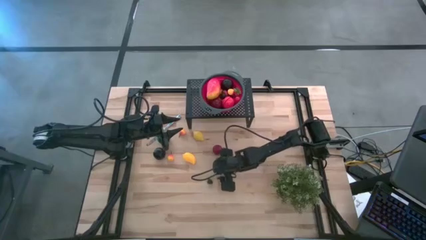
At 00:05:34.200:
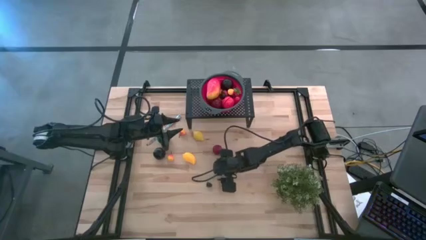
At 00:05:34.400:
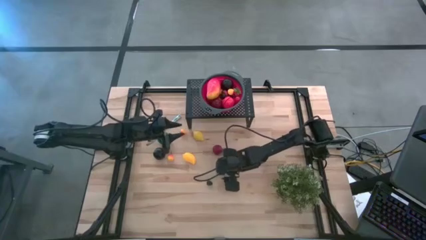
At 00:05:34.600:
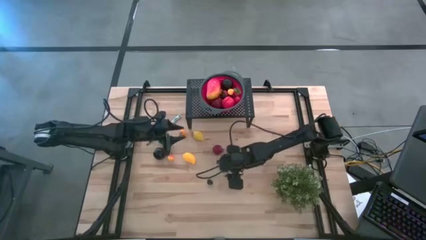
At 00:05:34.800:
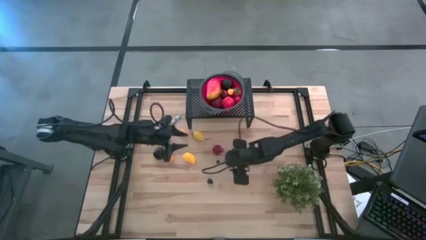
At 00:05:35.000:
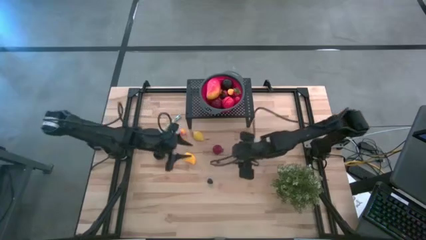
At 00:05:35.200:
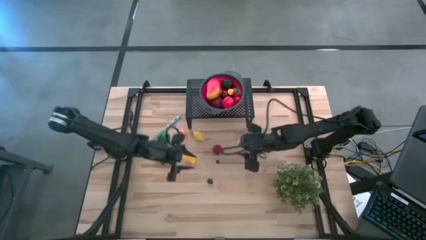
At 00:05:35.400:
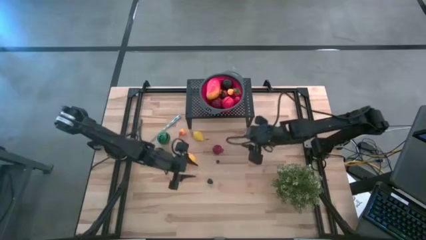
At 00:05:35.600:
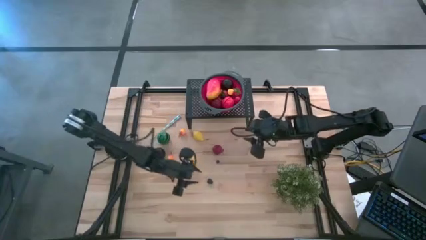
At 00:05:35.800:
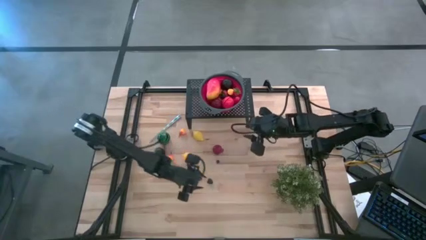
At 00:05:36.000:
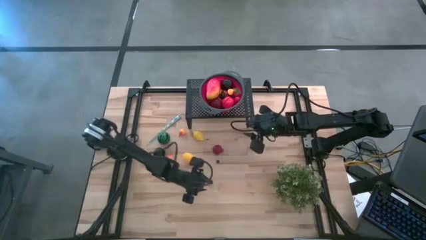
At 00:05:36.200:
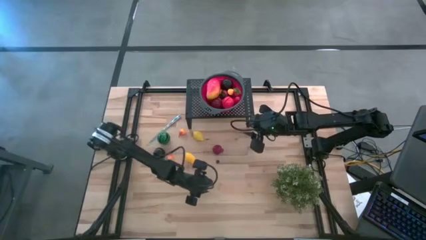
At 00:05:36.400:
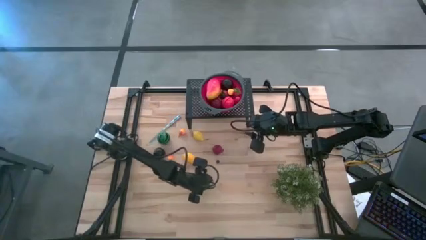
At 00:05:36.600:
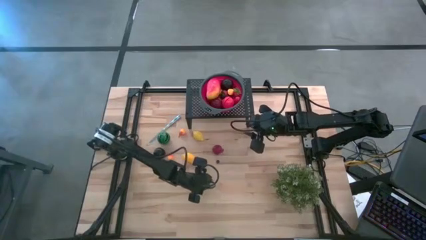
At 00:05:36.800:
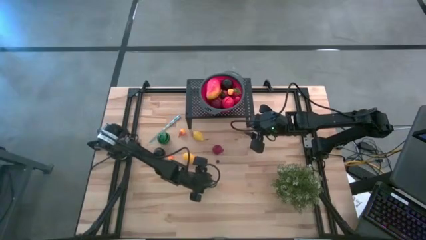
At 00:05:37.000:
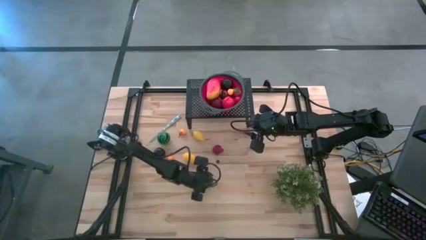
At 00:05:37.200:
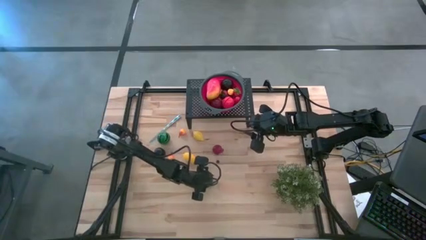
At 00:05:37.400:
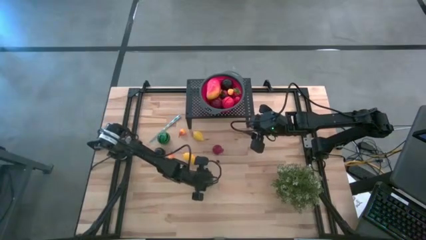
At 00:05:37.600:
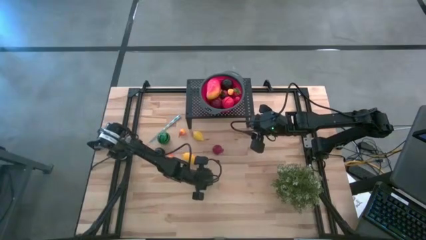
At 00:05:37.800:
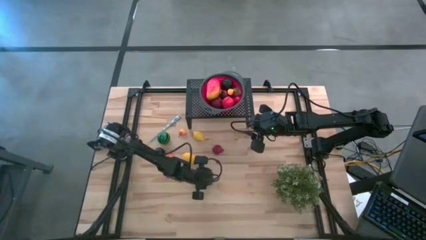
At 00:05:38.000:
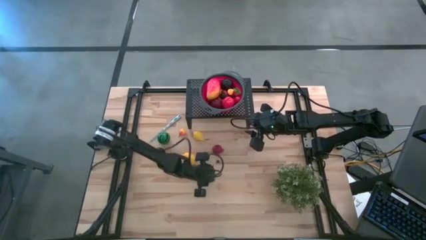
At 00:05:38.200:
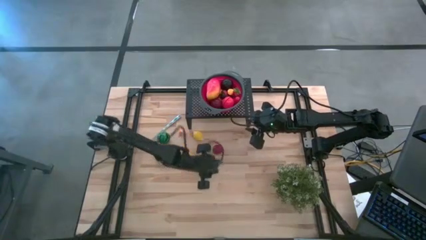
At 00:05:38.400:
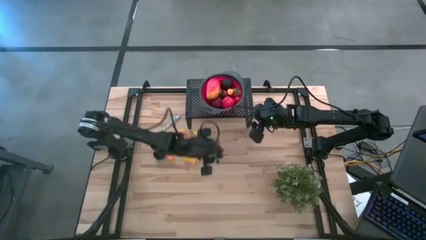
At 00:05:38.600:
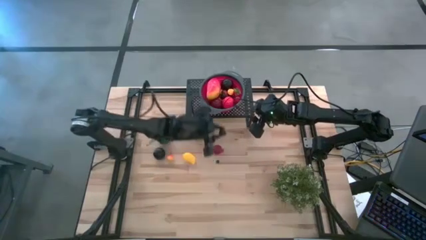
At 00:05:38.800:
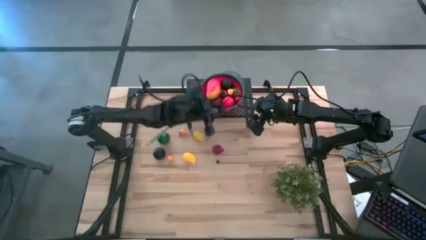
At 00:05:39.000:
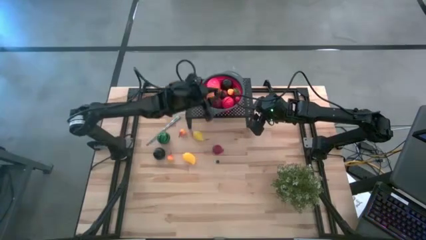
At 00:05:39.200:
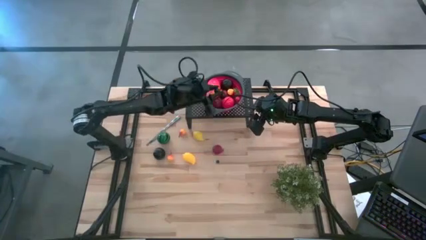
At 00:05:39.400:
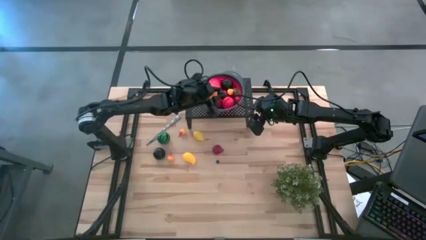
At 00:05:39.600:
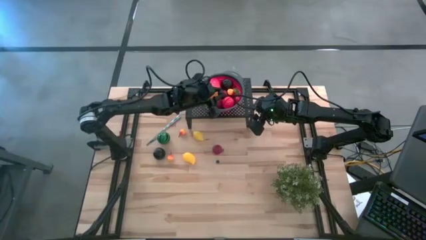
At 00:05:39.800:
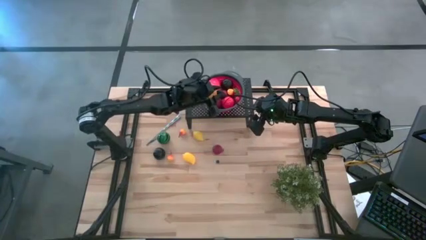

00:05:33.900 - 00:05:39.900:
Task: Pick & Place Fruit
Put the blackberry in the red colander on the shelf

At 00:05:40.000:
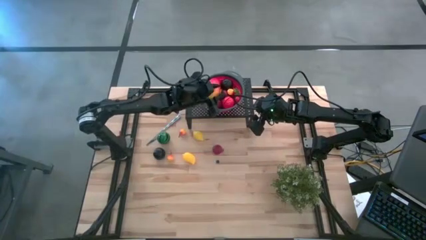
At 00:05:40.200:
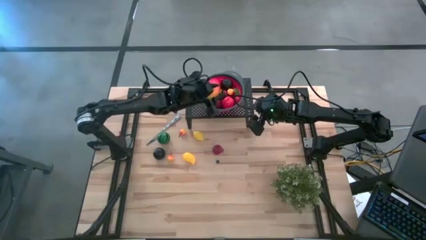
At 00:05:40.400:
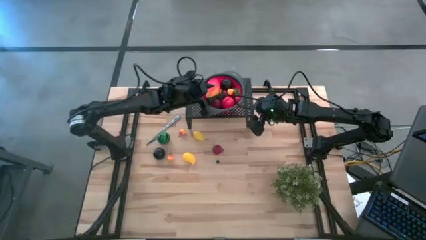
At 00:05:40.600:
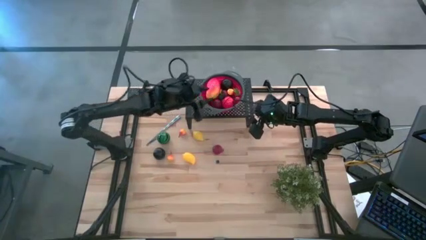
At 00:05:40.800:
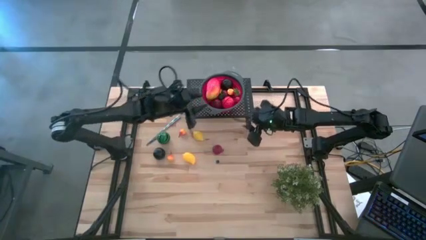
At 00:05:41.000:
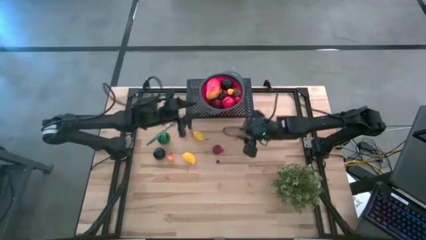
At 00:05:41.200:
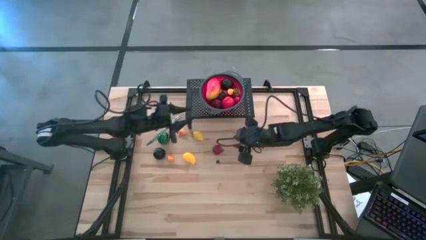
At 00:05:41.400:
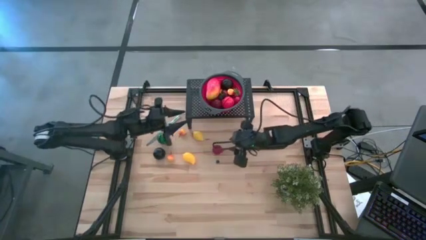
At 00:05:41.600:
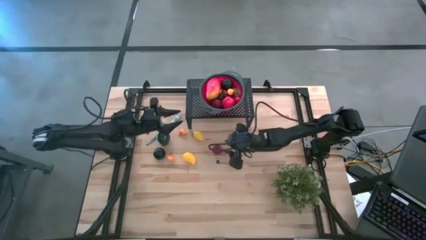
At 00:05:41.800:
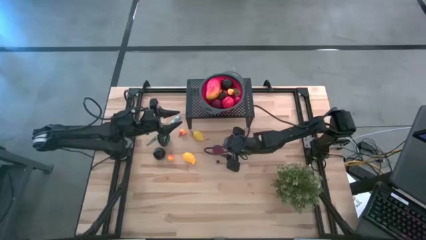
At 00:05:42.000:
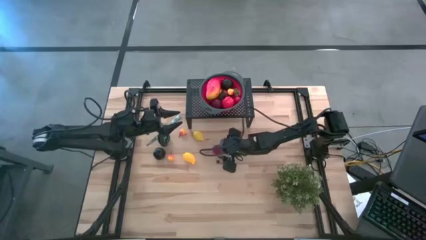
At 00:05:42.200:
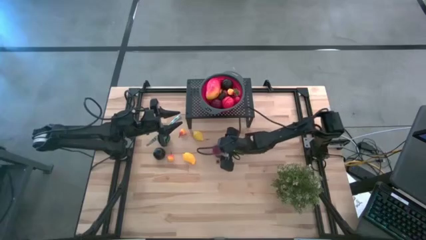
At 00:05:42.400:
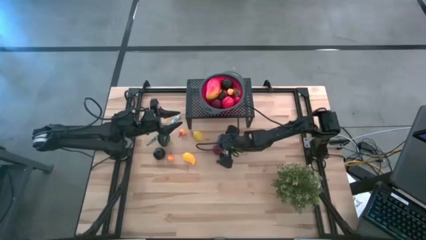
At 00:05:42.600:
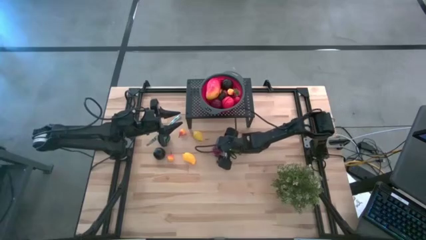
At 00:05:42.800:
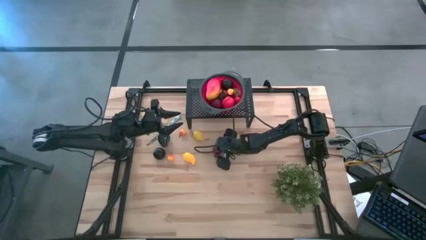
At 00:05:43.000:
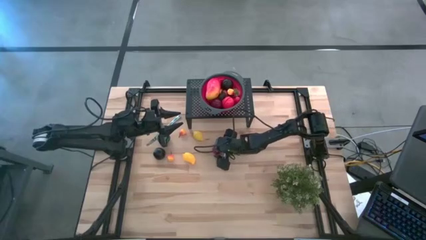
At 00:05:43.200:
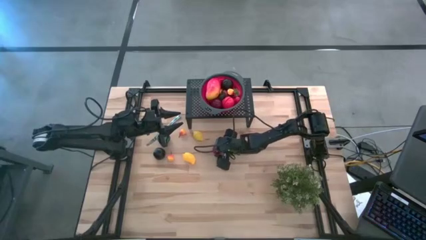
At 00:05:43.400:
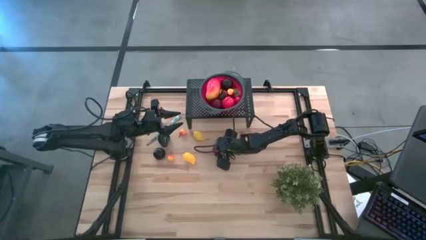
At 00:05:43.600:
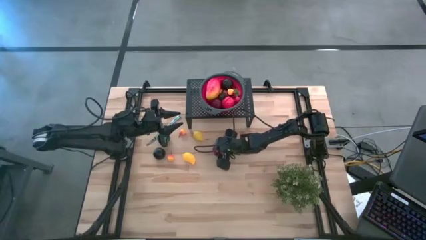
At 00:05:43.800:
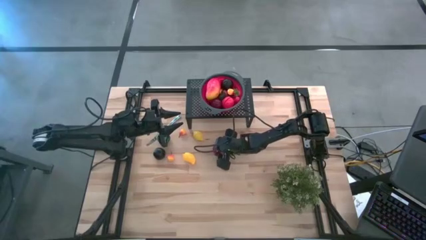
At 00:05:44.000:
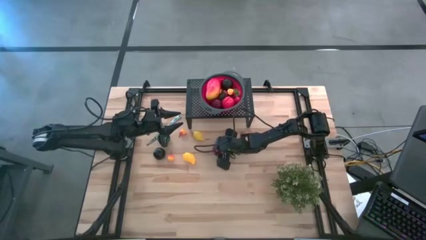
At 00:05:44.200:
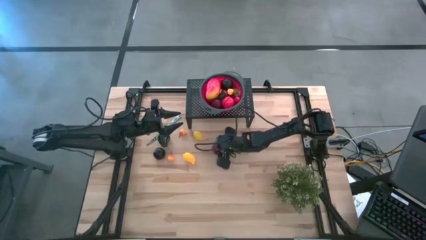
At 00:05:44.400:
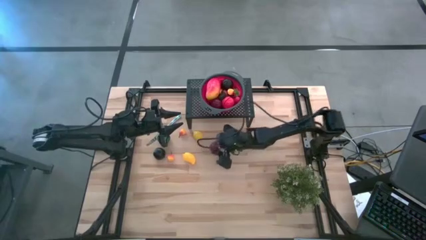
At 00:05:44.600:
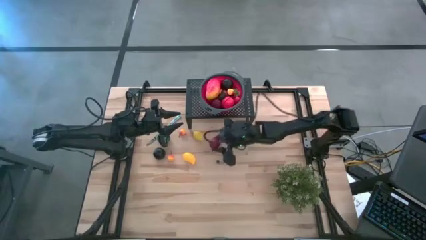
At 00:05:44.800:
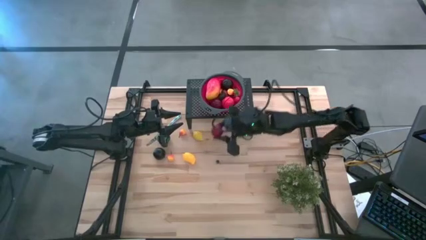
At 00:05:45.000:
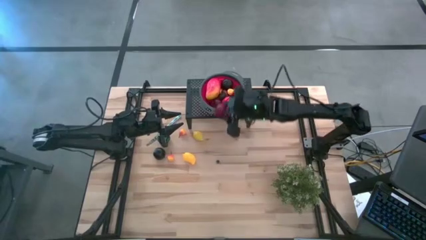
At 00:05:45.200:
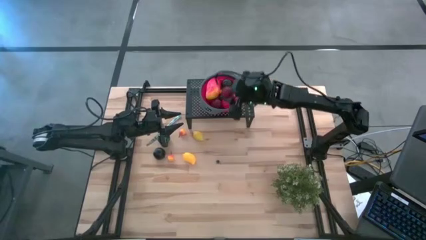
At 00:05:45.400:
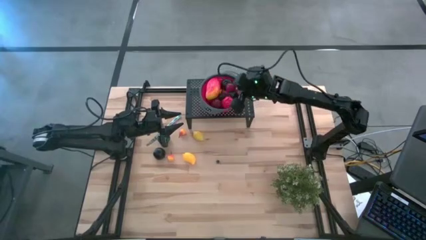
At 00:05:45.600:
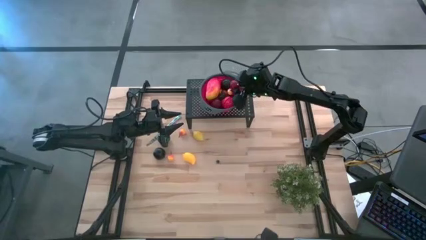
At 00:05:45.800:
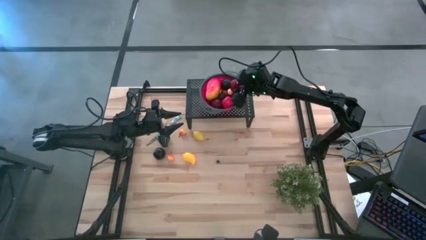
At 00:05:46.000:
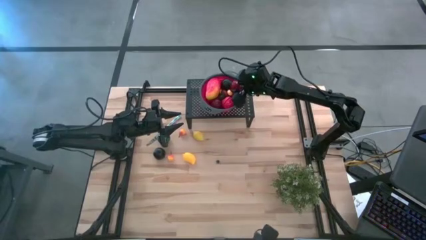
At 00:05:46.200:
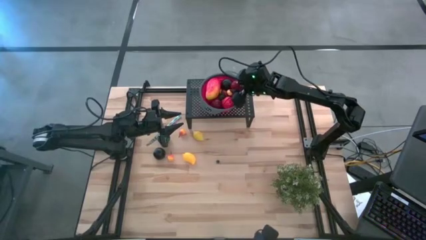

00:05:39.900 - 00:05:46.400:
Put the pomegranate in the red colander on the shelf

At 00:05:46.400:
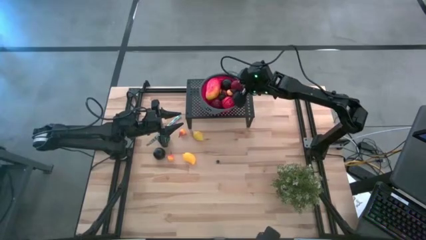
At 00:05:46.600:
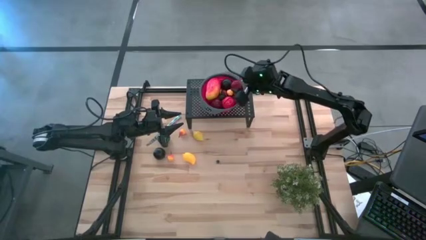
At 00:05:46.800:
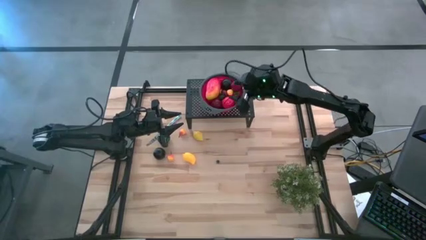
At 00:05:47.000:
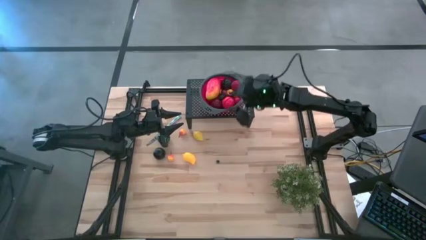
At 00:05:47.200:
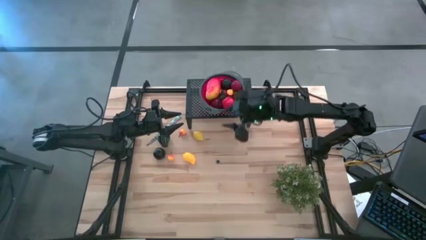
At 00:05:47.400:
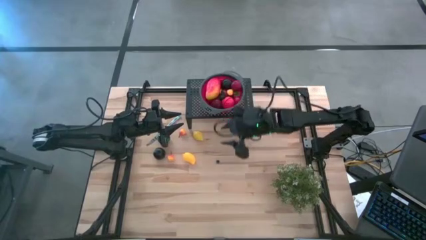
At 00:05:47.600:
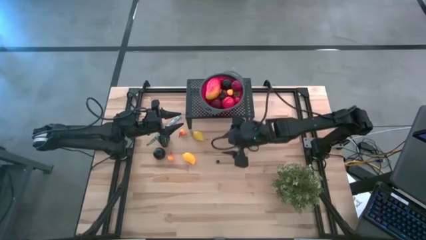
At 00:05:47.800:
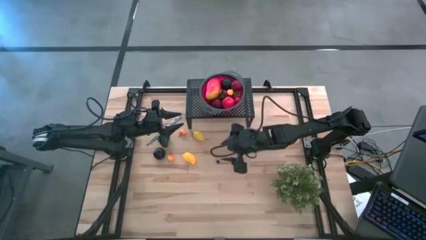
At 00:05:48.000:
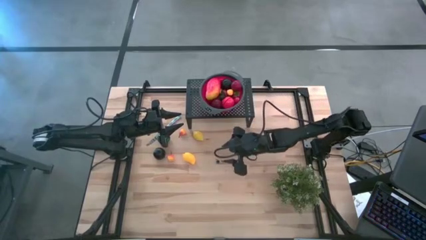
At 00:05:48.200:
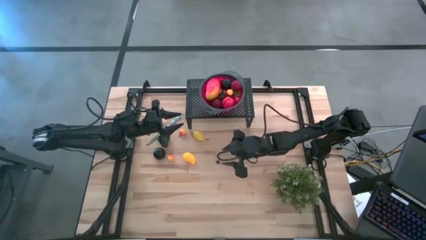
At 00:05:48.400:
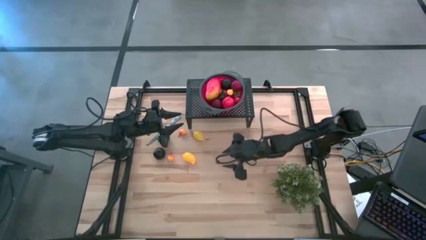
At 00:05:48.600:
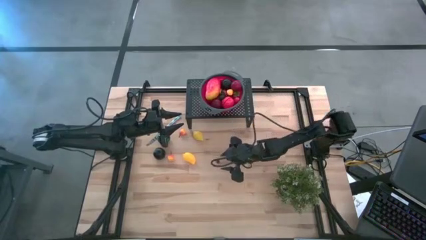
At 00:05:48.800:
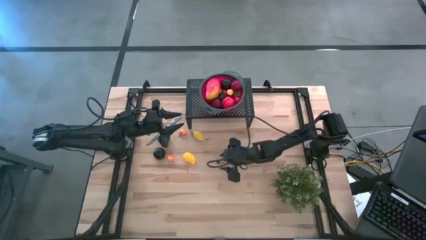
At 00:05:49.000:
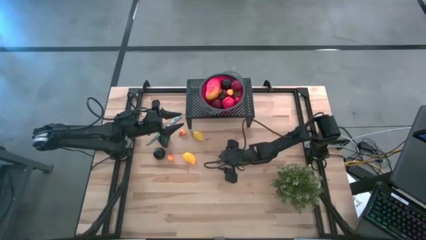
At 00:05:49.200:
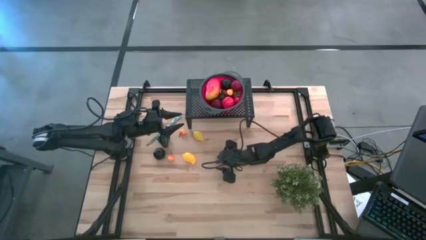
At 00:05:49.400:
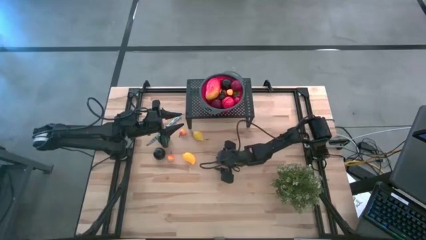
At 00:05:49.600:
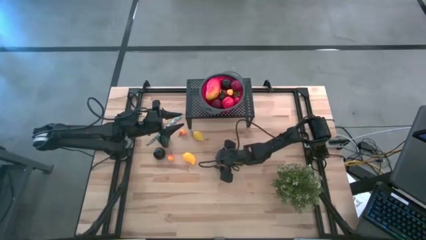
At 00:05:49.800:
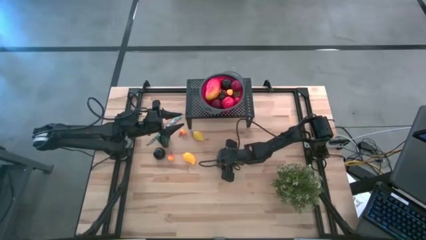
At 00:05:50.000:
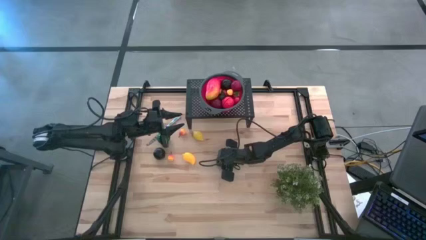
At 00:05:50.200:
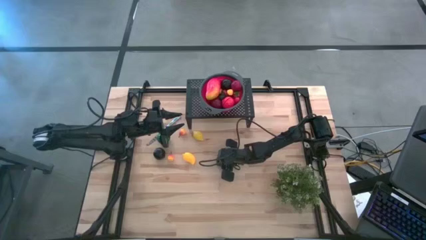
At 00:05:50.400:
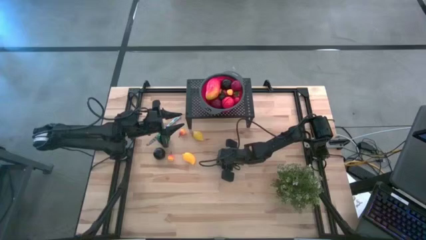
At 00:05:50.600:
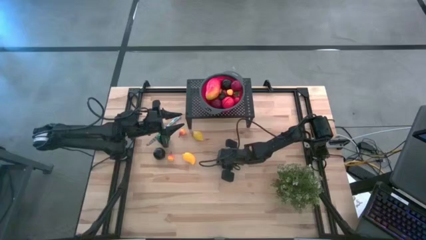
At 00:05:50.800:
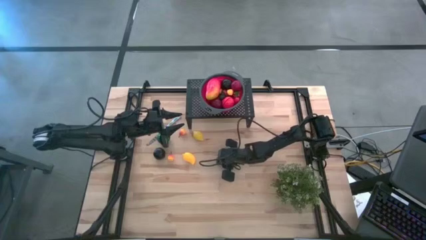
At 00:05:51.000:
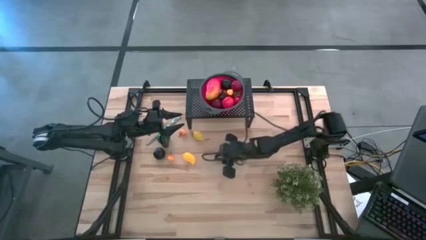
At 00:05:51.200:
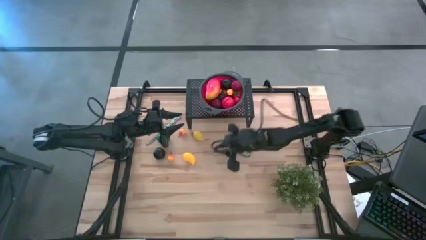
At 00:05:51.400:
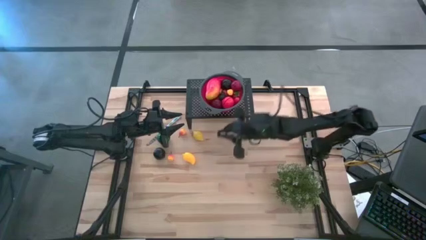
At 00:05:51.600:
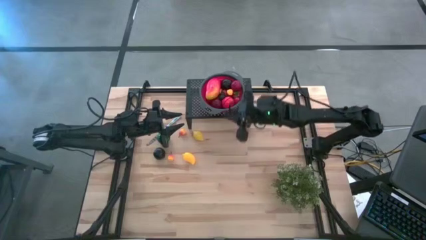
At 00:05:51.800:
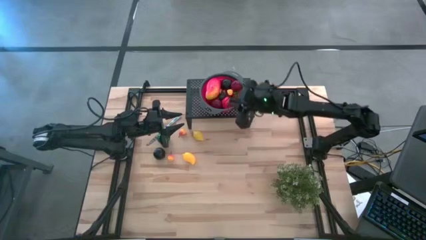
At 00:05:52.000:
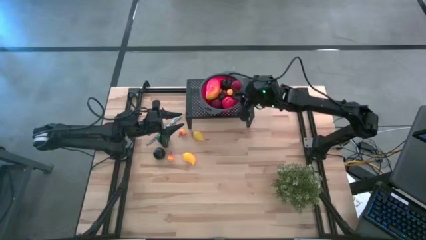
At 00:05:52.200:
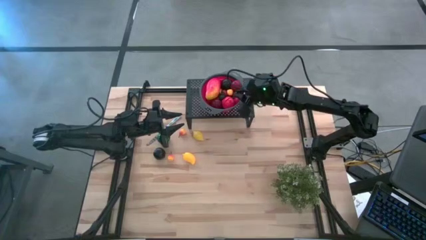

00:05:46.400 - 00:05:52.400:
Put the blueberry in the red colander on the shelf
